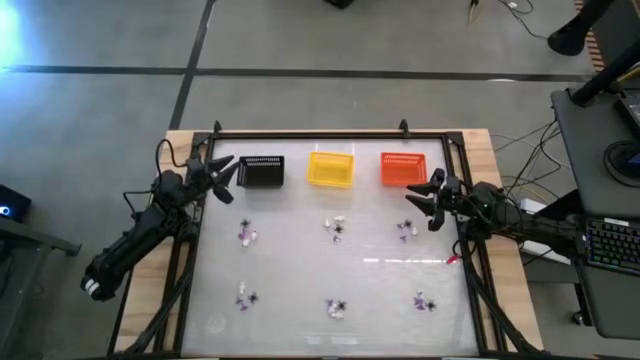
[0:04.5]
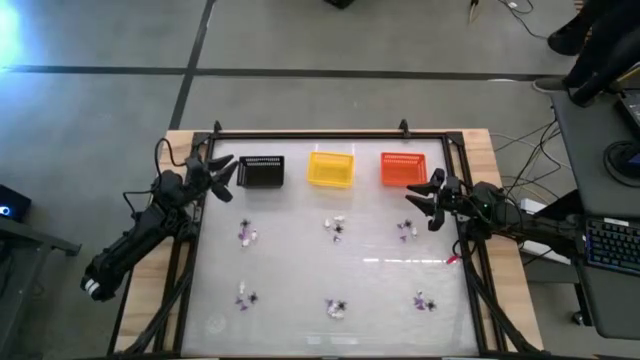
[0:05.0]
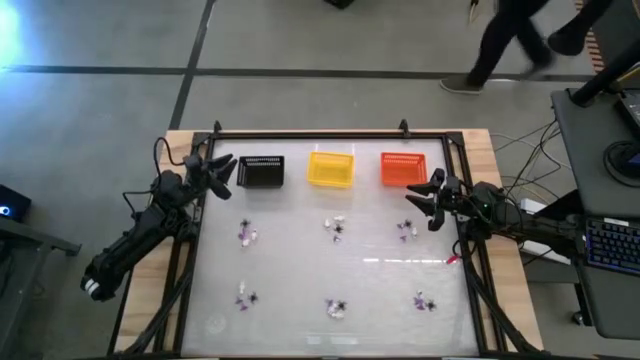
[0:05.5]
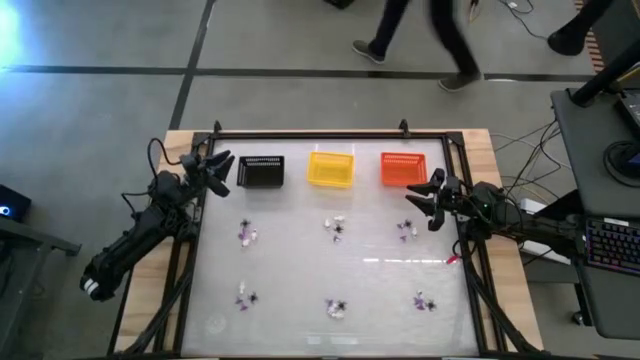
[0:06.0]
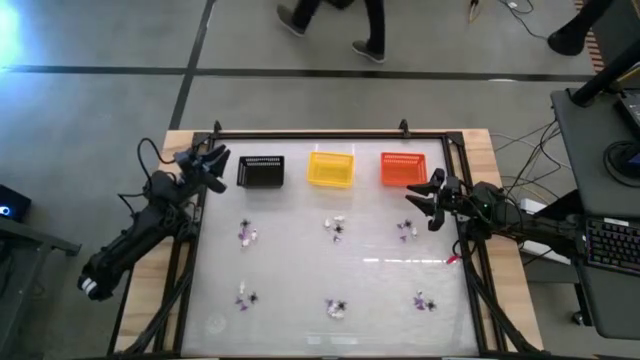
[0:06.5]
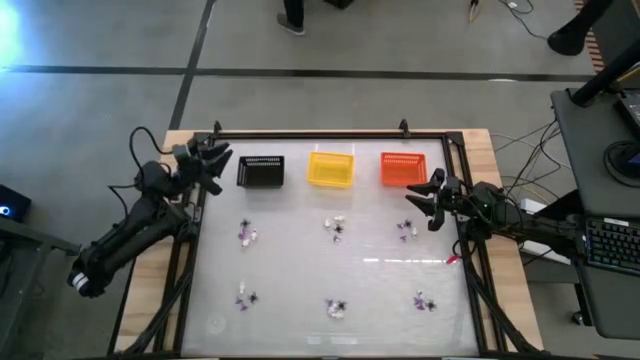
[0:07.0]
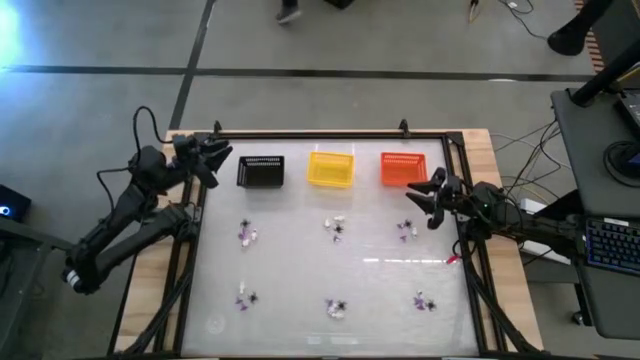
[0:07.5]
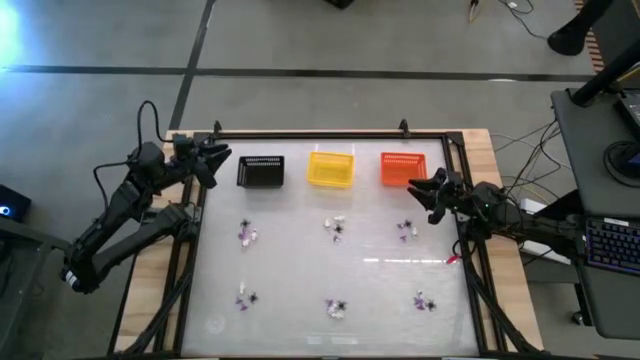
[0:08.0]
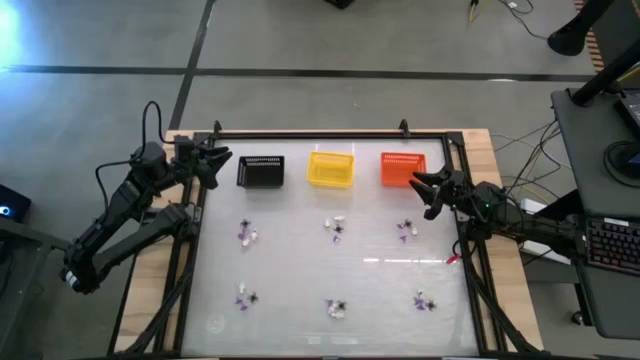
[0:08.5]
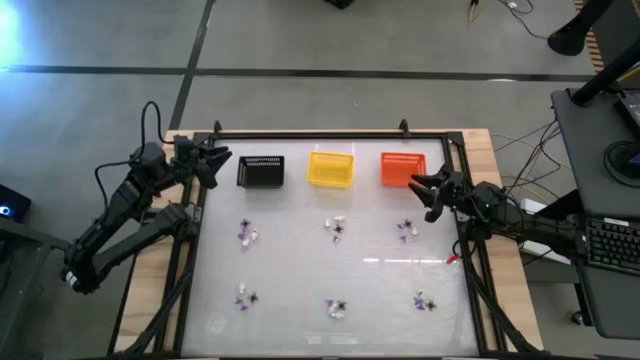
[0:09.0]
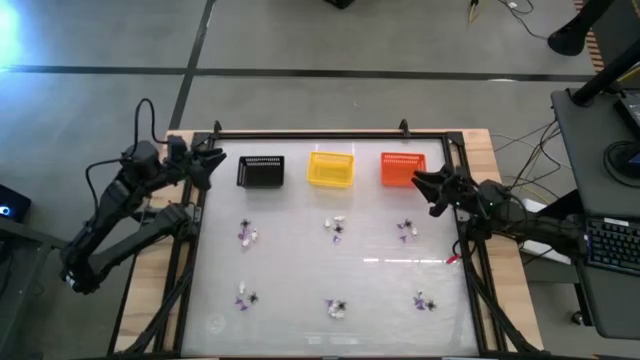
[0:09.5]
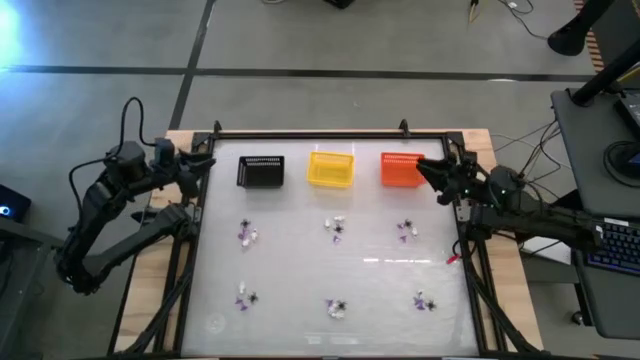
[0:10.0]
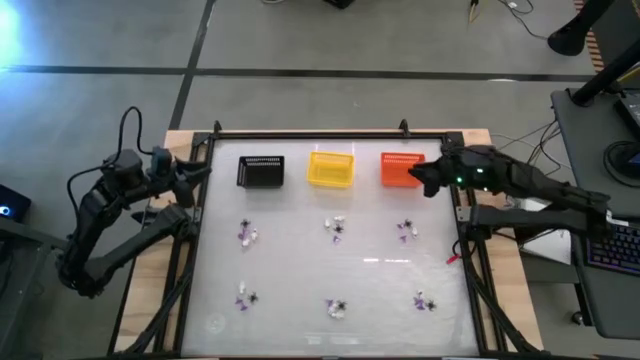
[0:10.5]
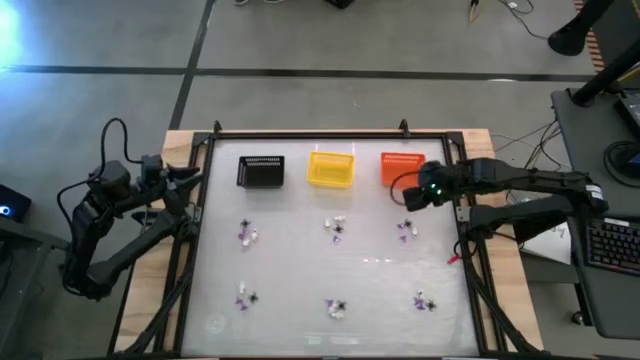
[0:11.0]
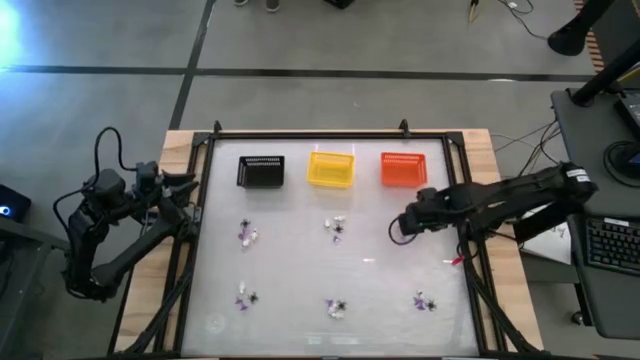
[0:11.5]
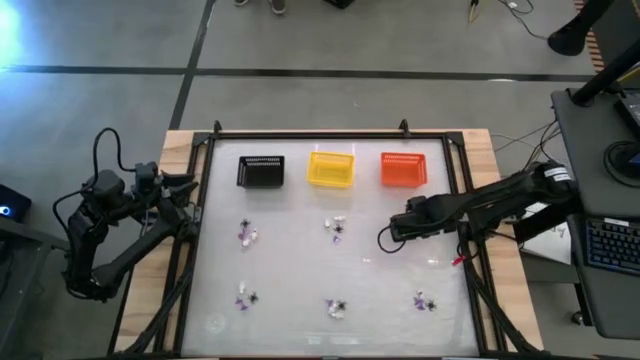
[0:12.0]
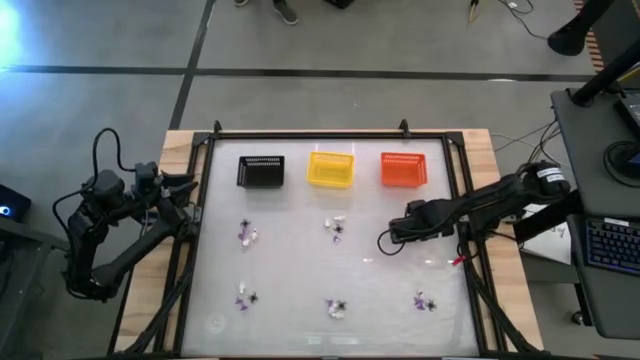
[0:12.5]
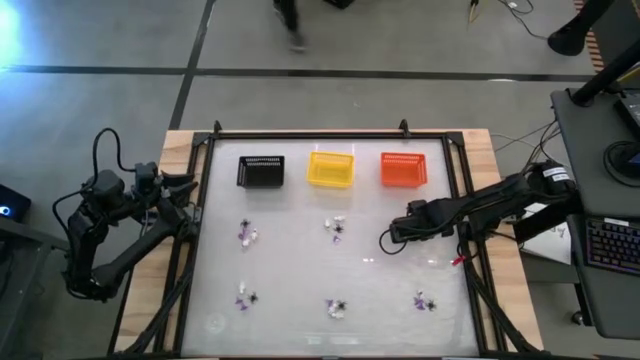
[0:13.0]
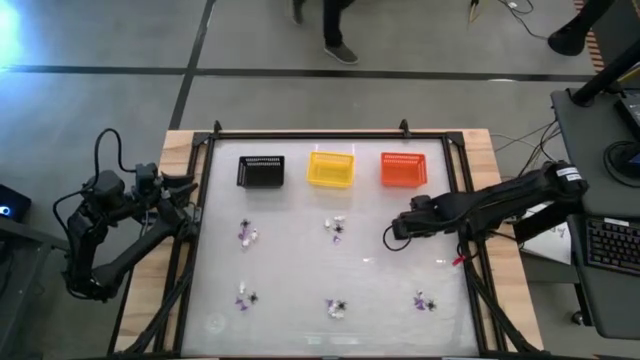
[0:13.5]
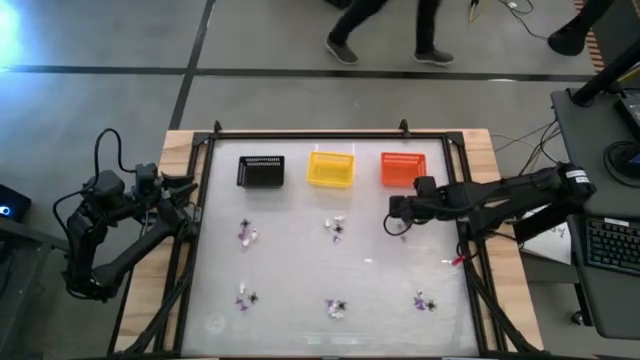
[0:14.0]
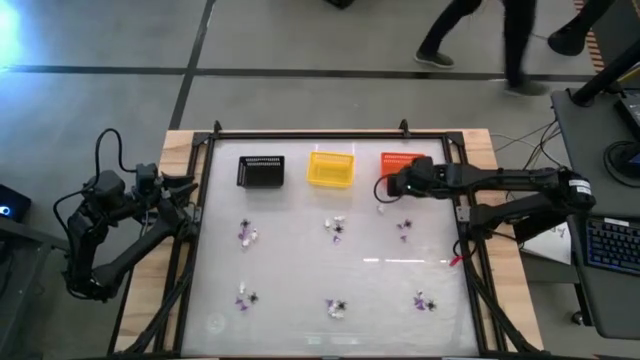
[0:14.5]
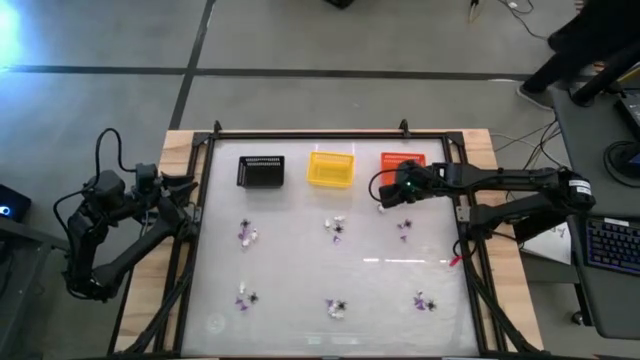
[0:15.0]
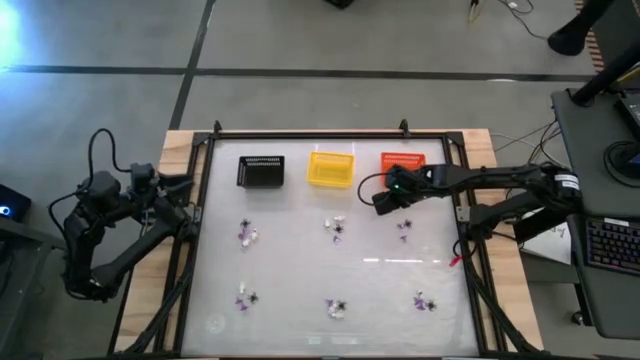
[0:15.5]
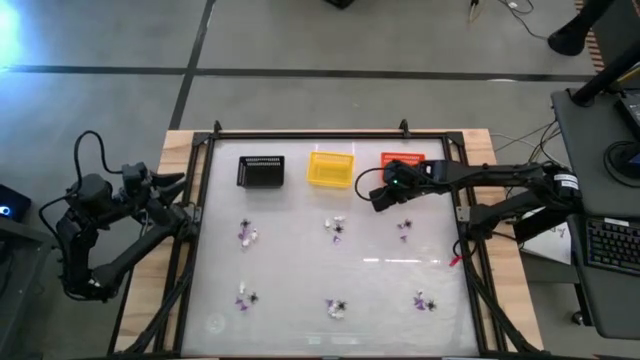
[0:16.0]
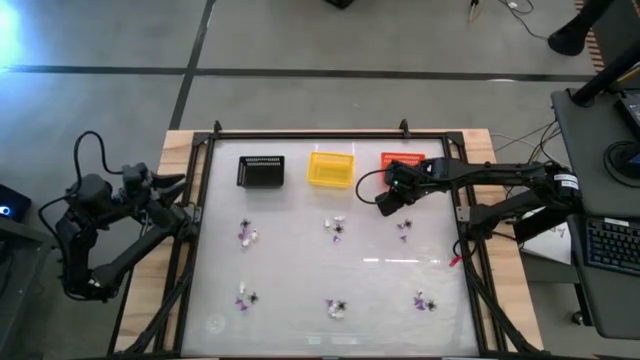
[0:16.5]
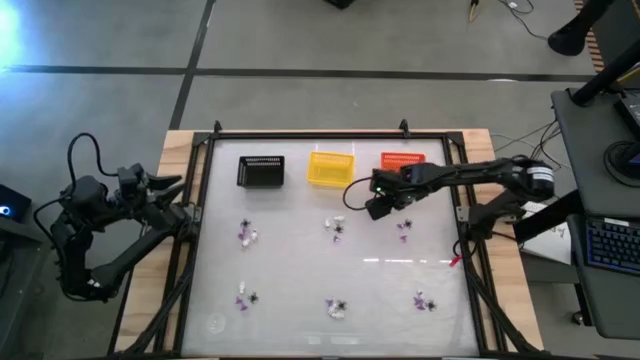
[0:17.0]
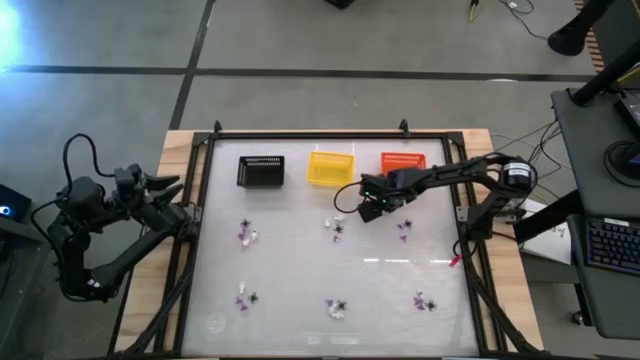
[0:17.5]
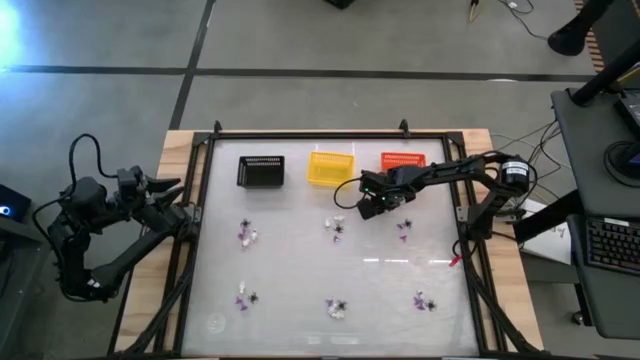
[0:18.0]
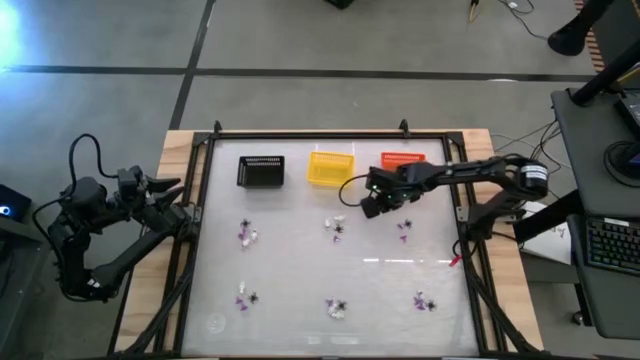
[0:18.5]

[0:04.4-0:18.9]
Task: Sort Halloween decoration
Put the white skeleton toy into the orange bin

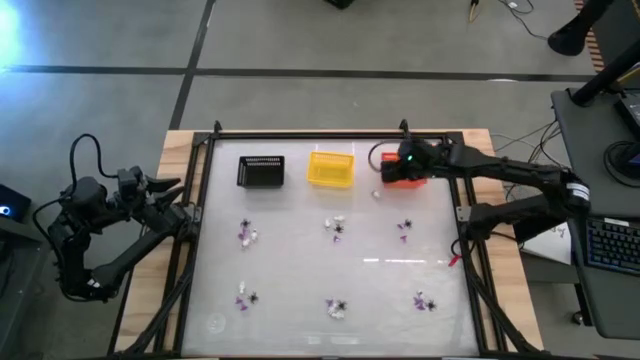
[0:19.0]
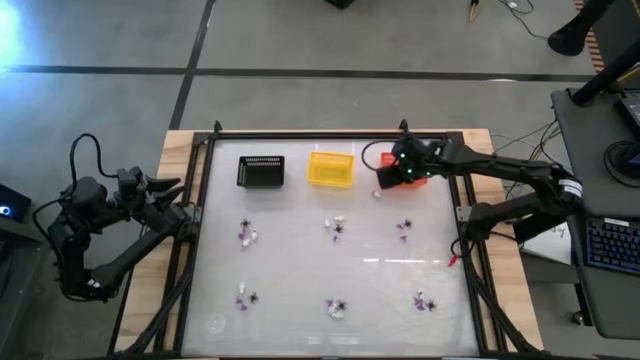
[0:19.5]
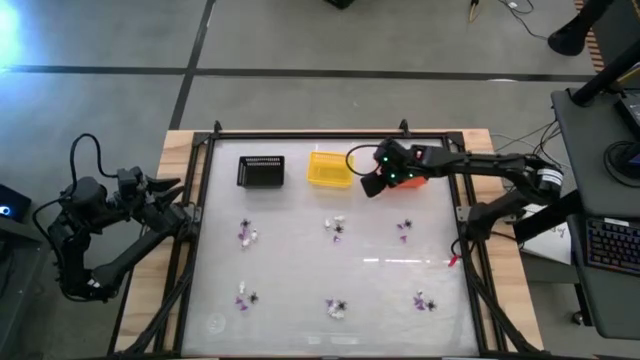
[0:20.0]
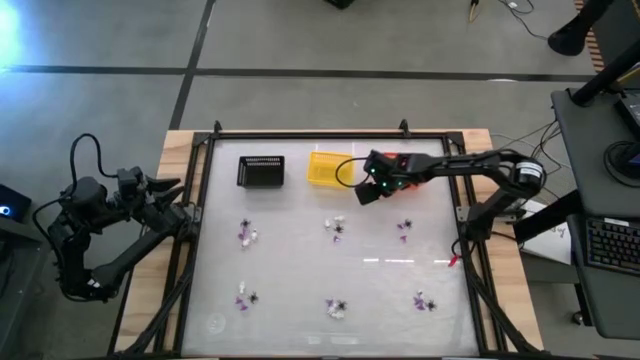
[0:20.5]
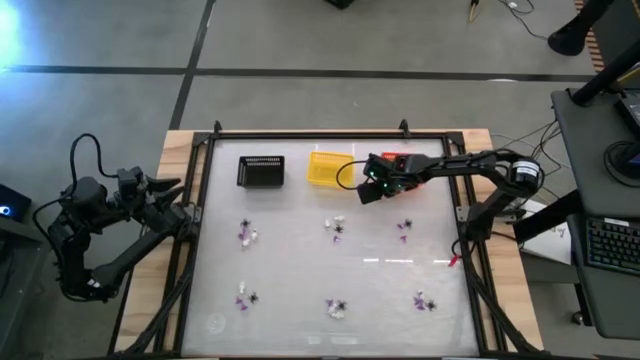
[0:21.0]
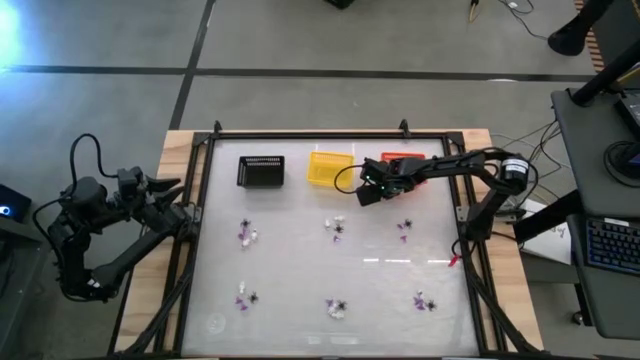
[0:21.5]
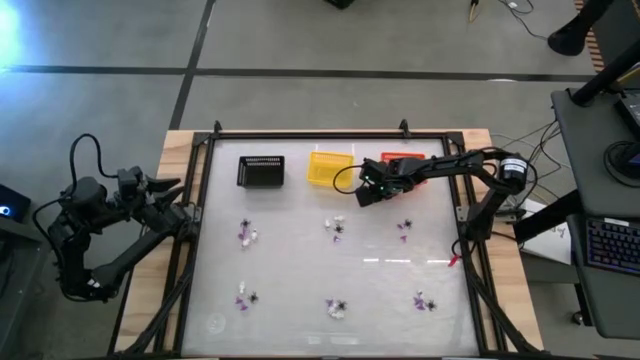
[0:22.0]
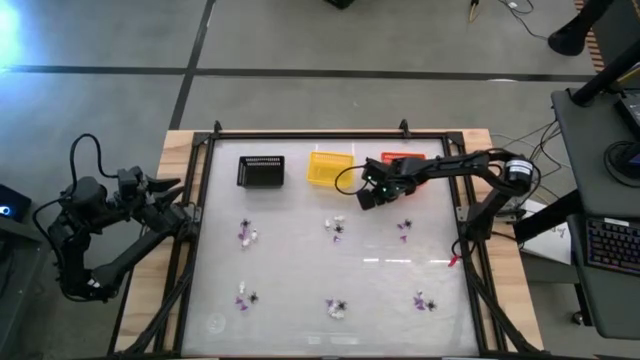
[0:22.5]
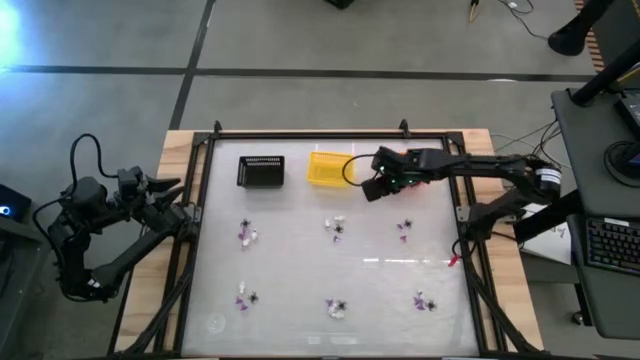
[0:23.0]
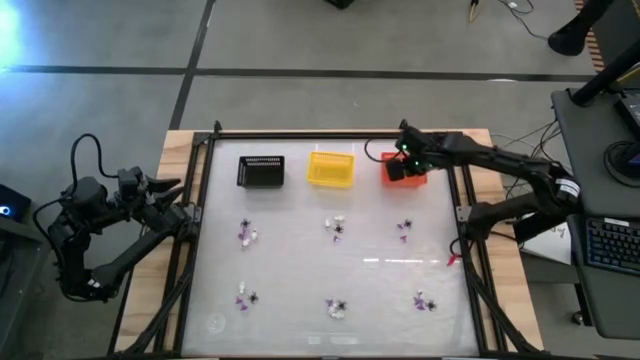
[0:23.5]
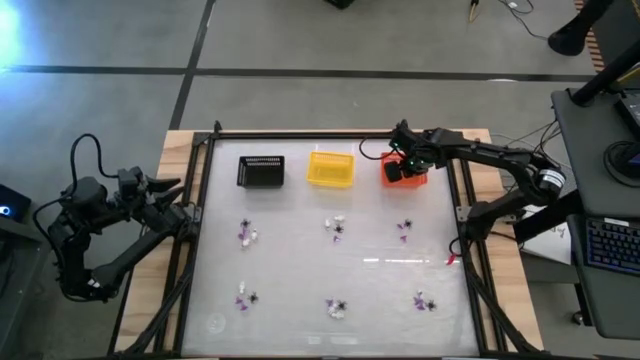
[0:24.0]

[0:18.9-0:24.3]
Put the white skeleton toy into the orange bin
